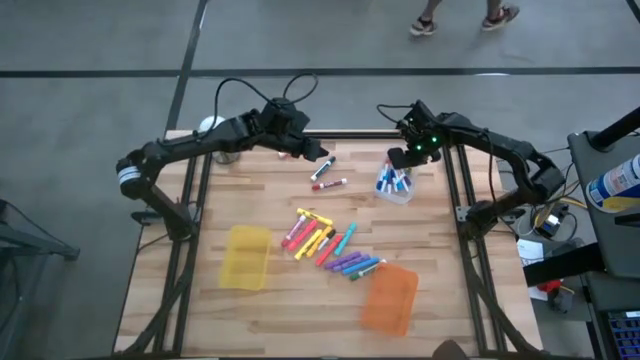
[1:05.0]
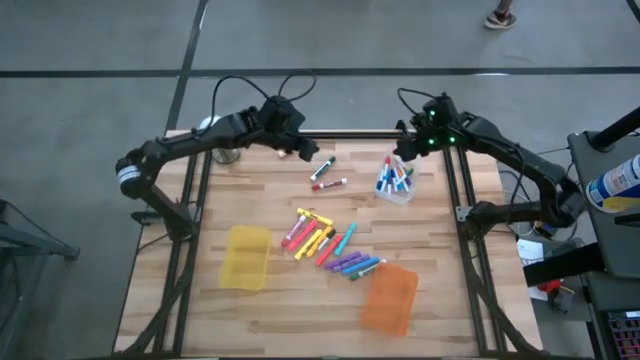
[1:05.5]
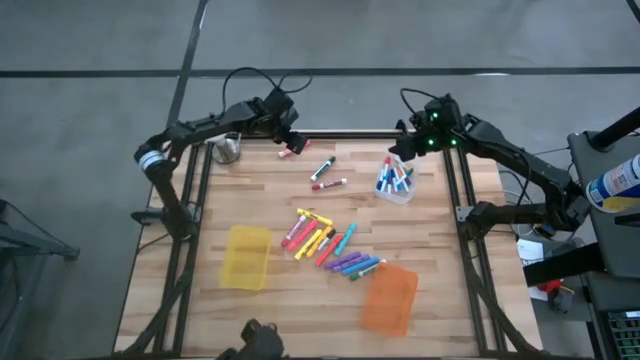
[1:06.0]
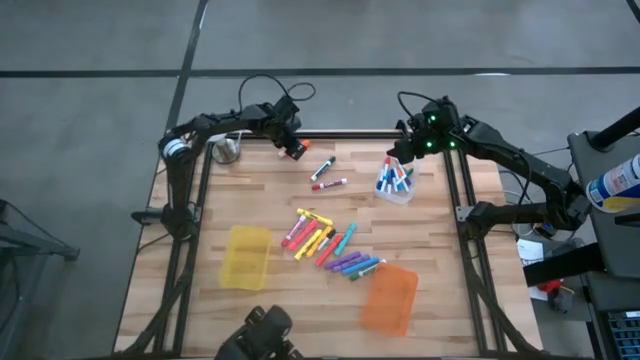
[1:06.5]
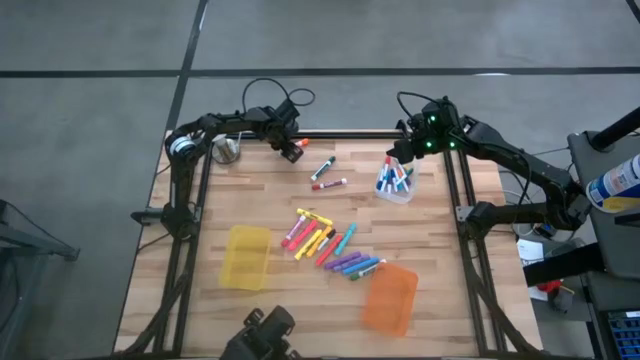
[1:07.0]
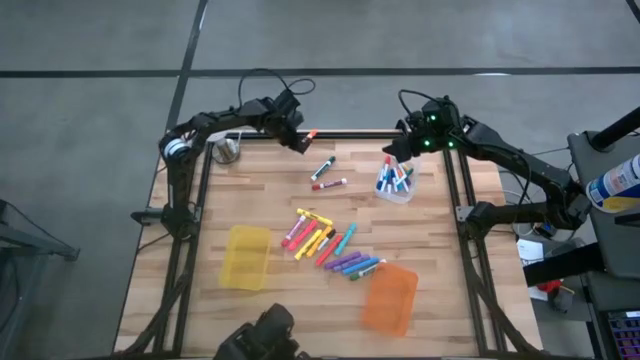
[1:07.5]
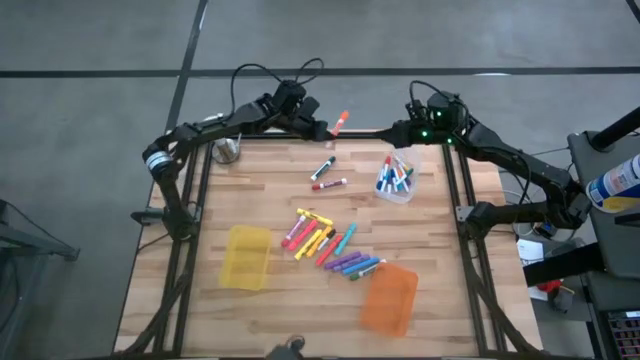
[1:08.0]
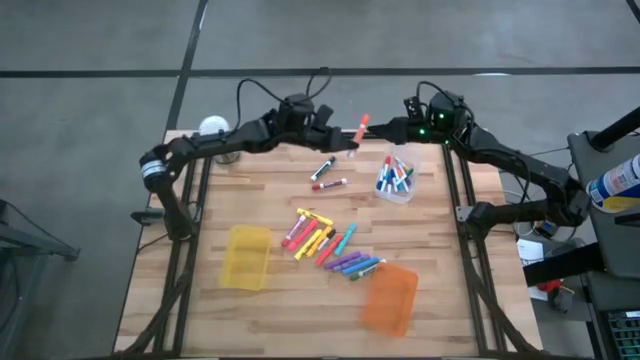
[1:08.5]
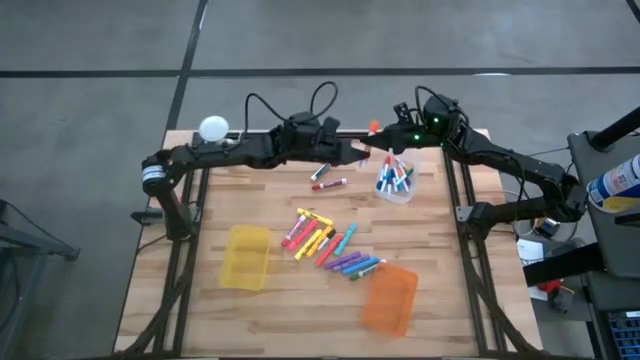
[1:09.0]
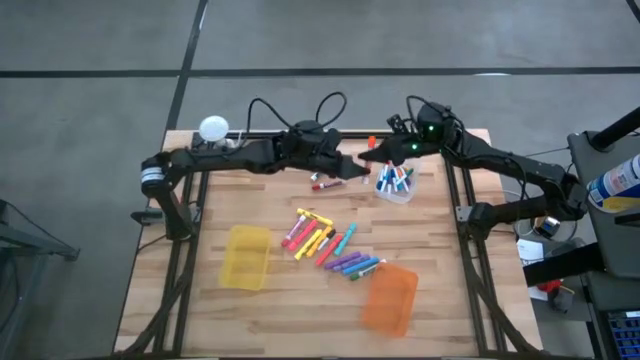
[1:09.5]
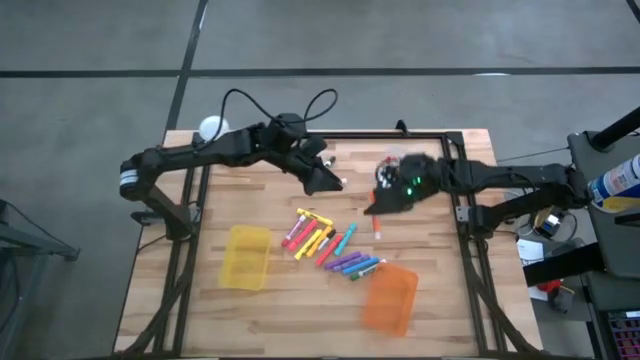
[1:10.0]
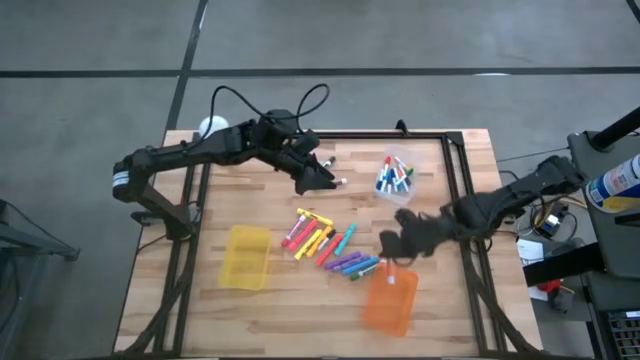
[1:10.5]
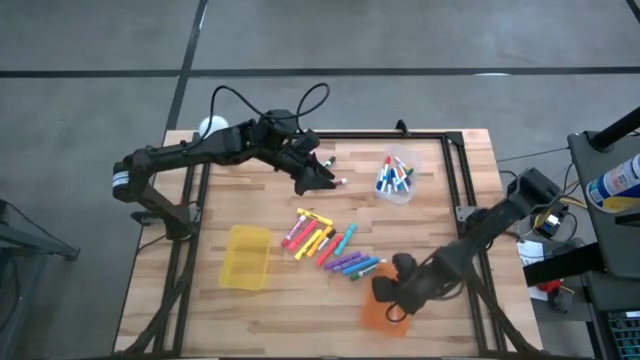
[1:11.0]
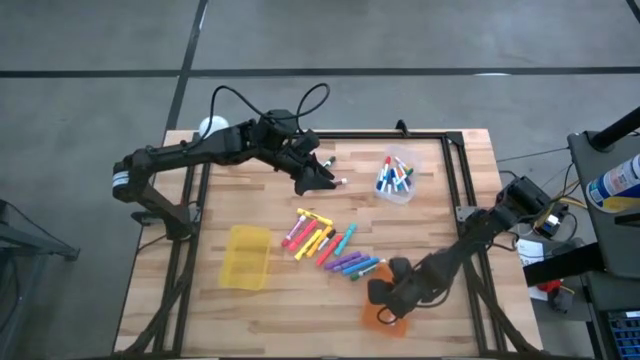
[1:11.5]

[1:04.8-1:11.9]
Task: Pick & Place Markers
Put the orange marker pen into the orange bin

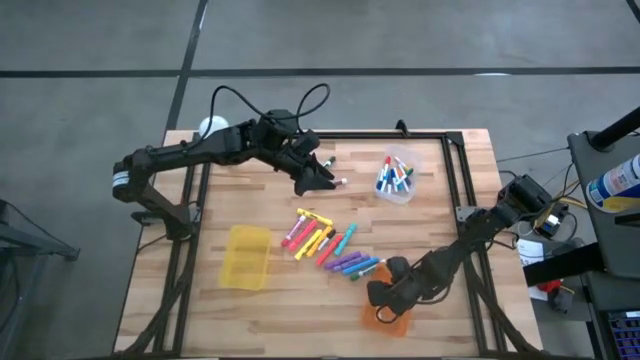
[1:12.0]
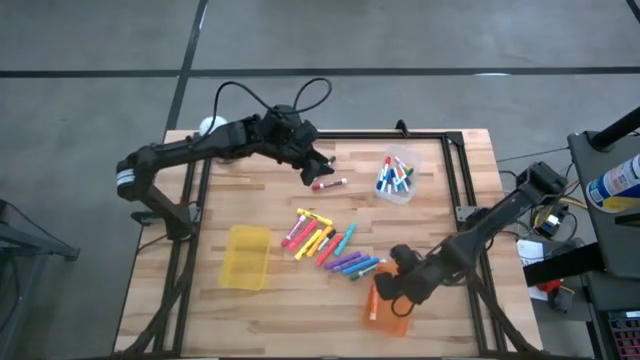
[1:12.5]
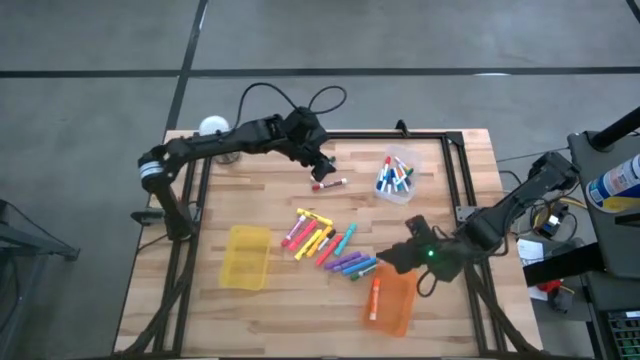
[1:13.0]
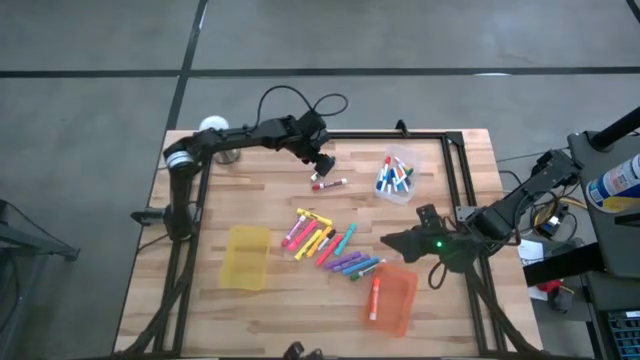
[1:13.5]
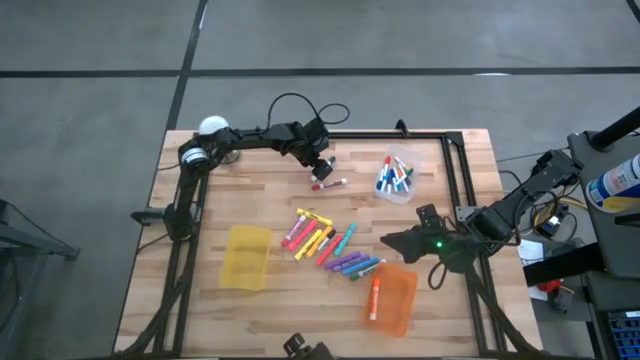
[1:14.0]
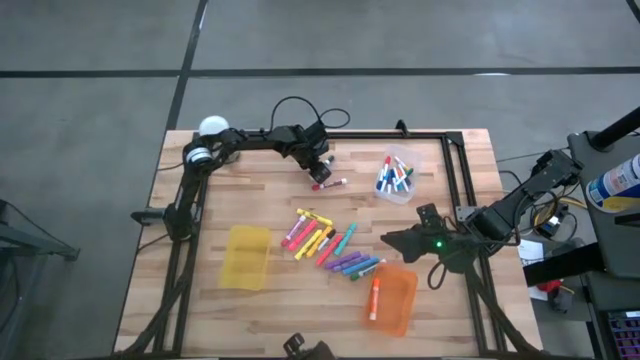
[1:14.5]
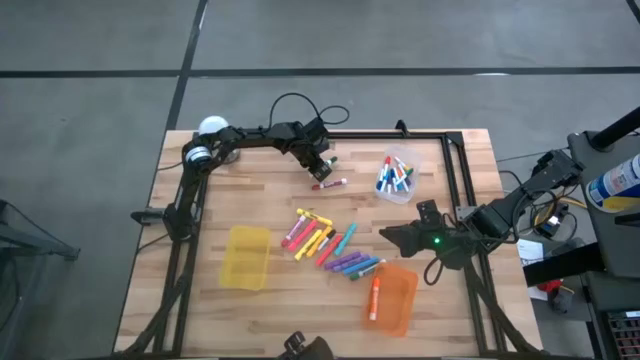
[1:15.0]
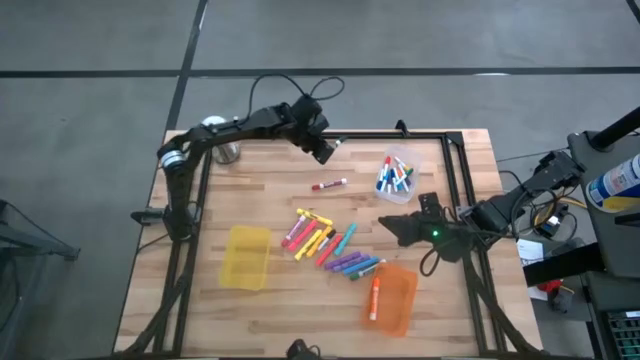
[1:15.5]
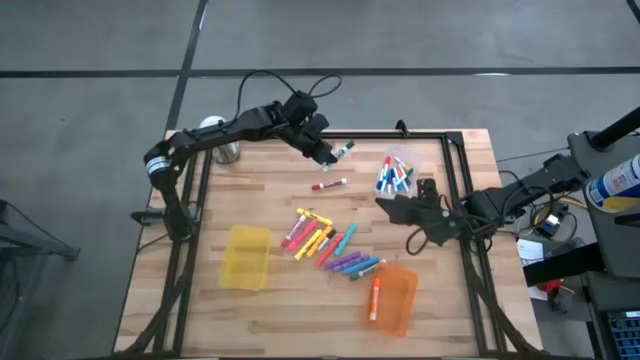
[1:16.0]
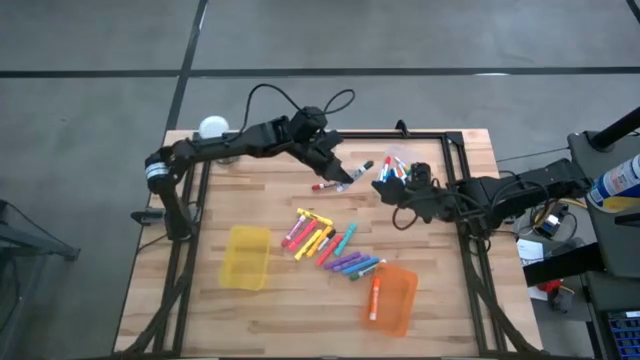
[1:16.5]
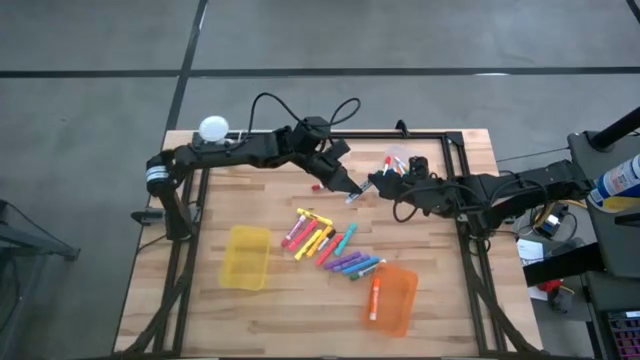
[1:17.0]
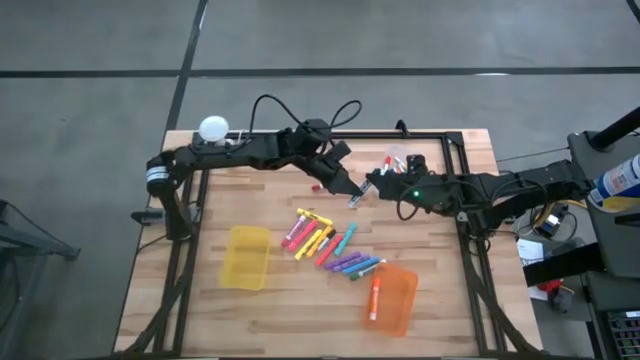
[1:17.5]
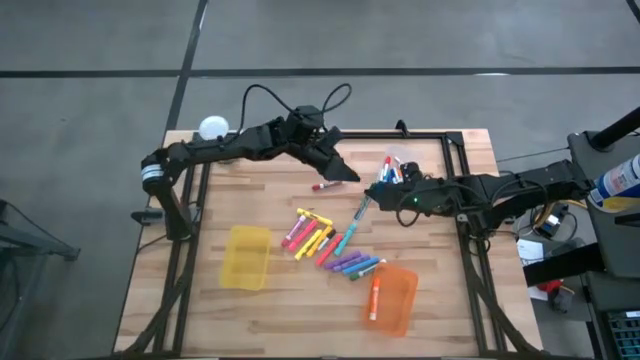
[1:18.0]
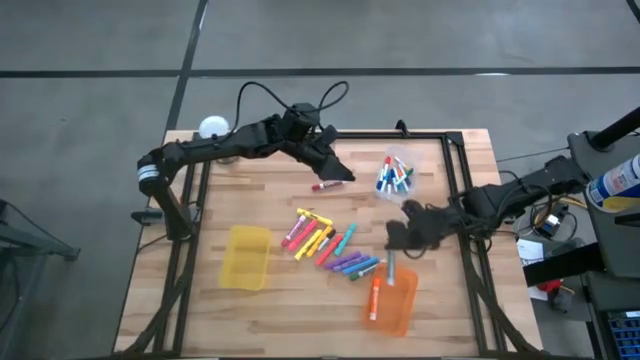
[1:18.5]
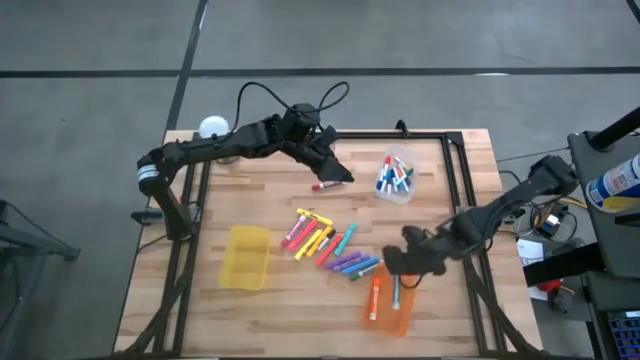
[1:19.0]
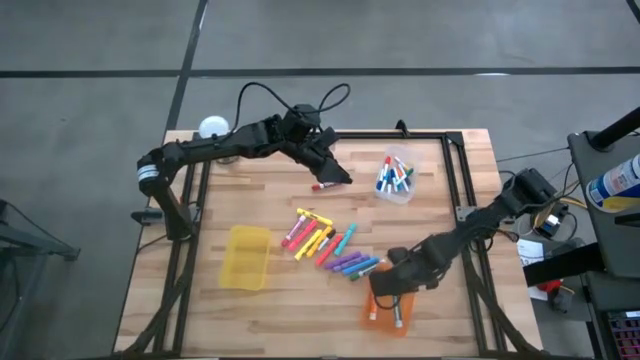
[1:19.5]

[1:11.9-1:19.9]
Put the top green marker pen into the orange bin

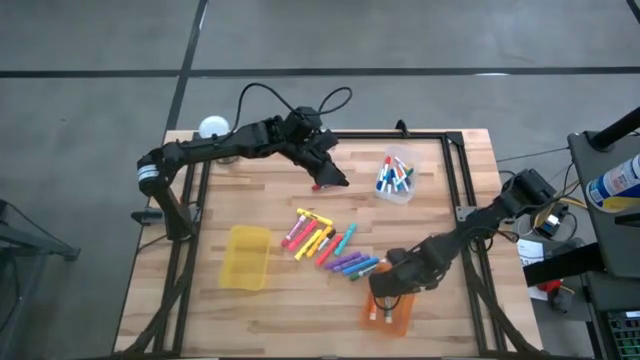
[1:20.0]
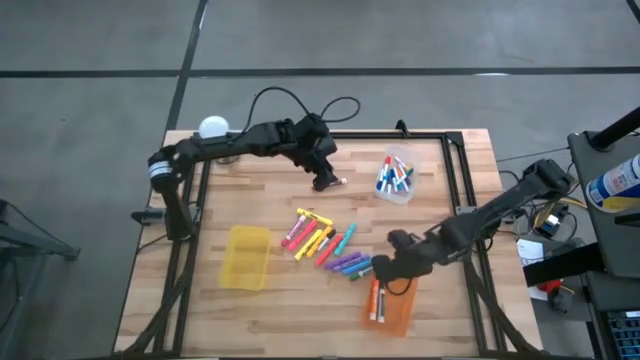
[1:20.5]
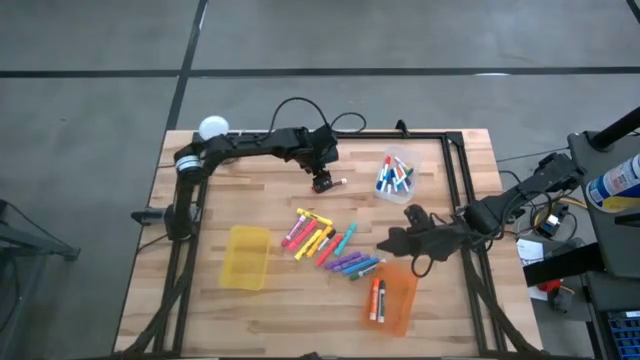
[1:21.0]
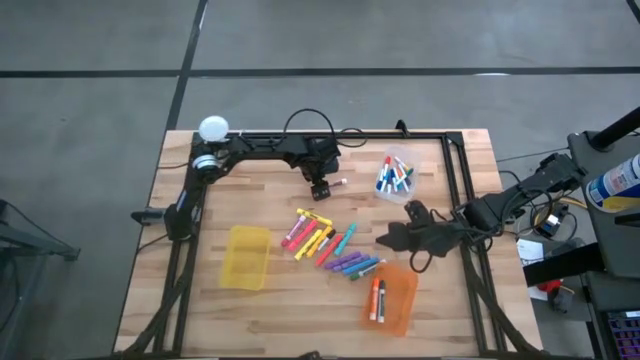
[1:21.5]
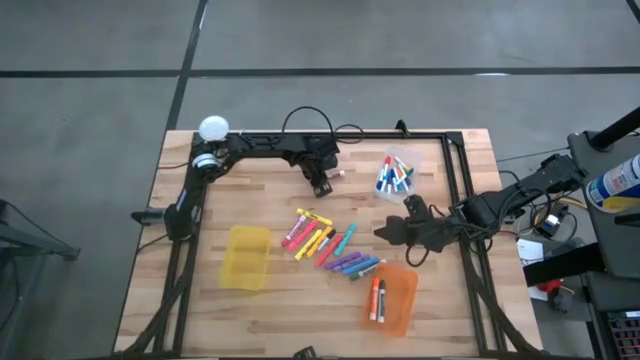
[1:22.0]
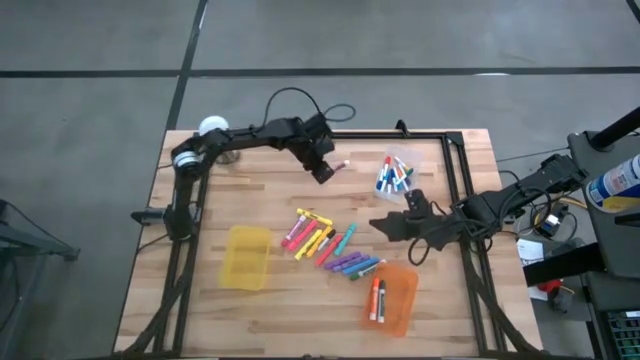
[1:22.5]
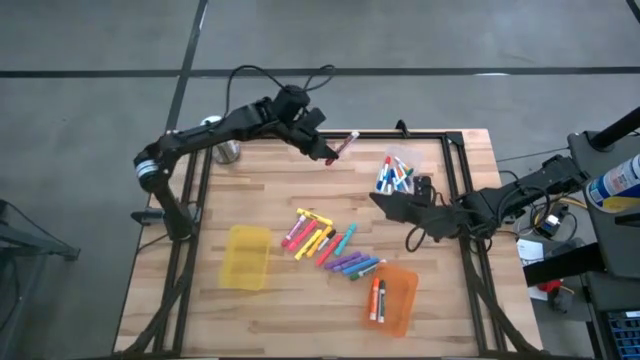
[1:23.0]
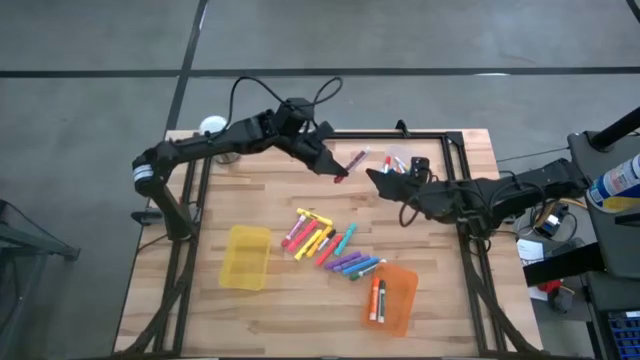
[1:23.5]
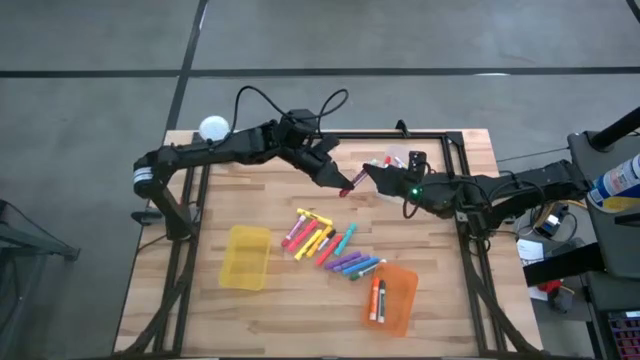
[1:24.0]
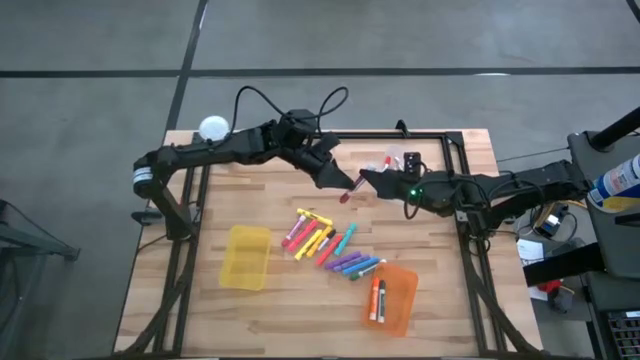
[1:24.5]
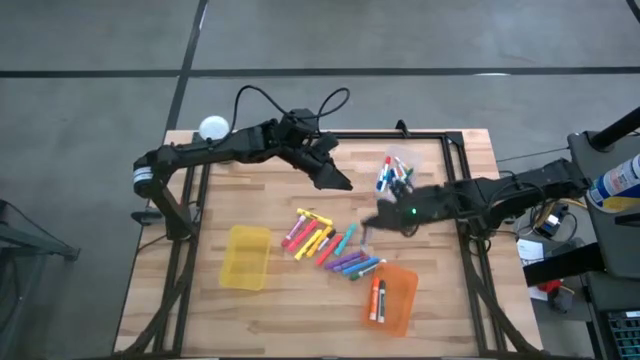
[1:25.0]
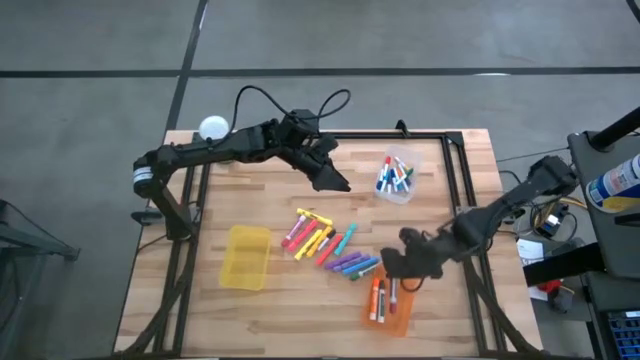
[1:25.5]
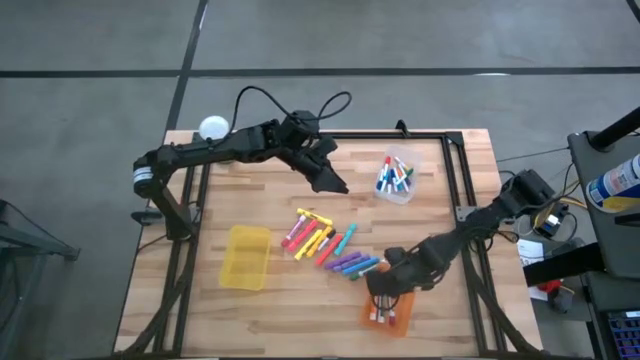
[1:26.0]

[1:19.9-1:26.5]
Put the red marker pen into the orange bin
